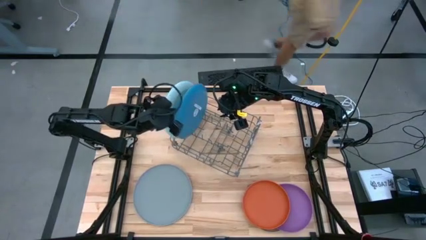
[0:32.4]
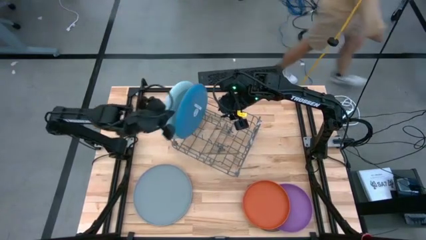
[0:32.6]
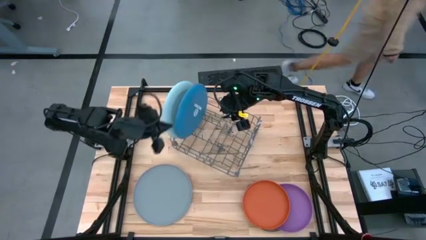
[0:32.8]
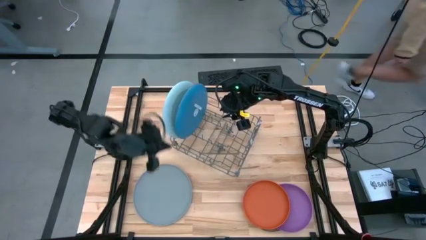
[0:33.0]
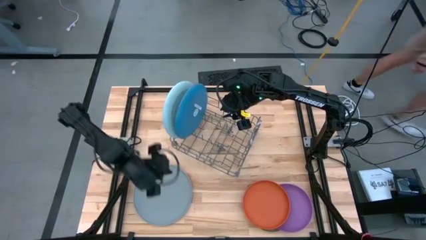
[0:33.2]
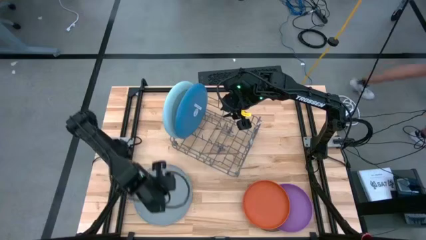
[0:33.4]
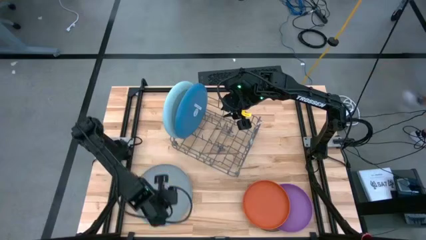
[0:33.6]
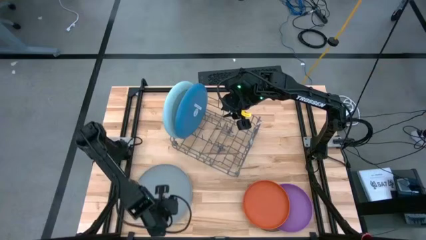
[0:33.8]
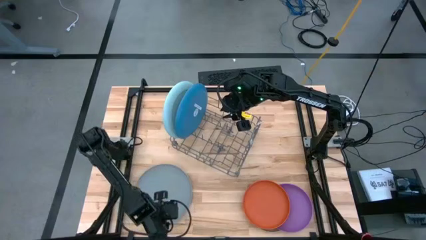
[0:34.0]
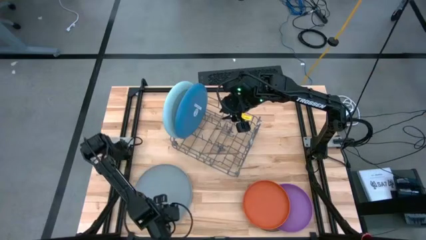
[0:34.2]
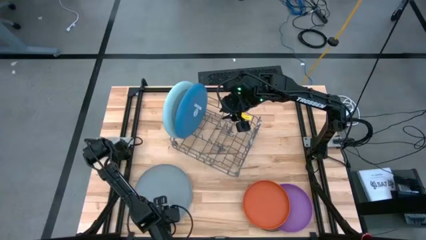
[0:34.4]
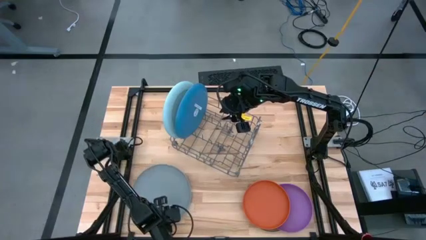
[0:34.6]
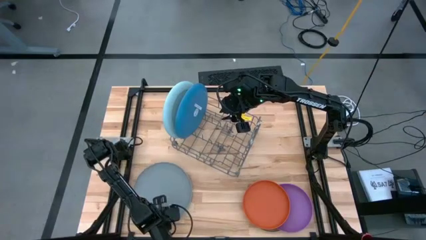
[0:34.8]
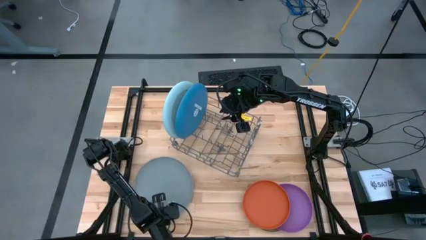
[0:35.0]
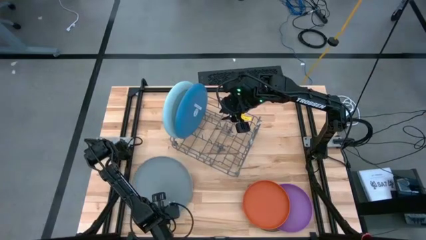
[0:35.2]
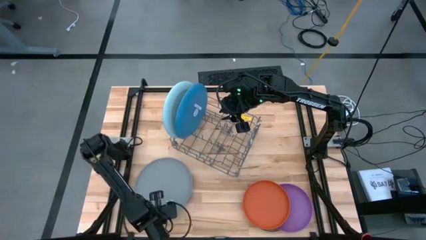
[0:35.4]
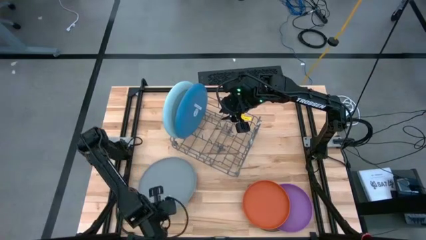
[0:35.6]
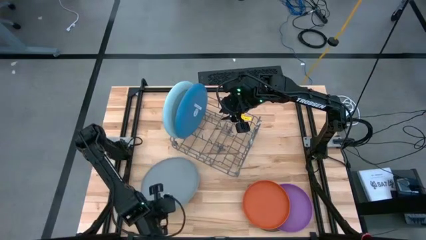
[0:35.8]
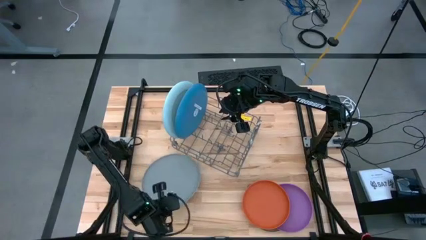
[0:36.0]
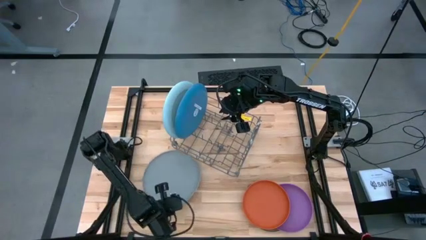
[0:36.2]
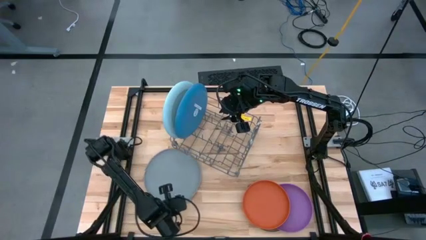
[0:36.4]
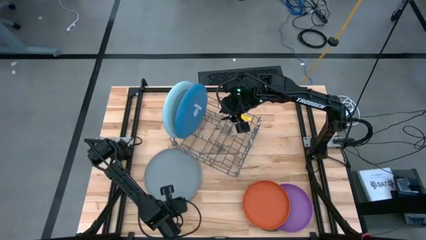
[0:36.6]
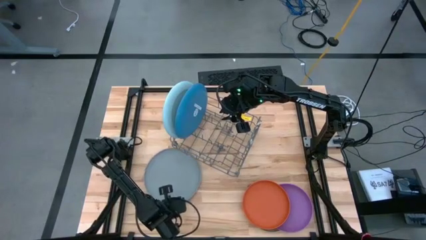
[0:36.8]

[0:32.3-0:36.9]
Task: Sort dishes
Put the gray plate in the dish rack

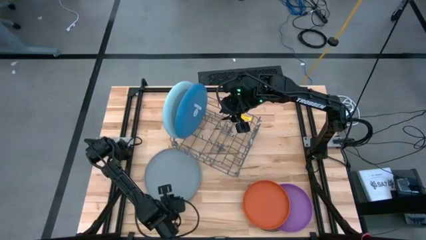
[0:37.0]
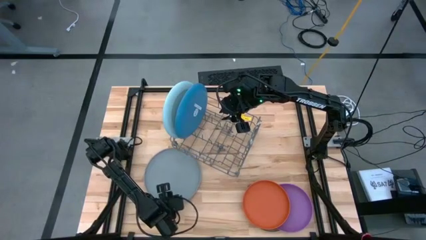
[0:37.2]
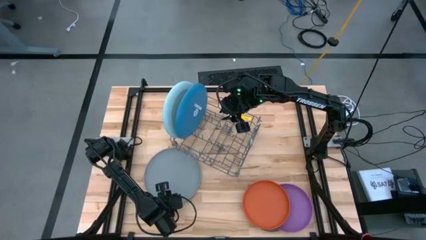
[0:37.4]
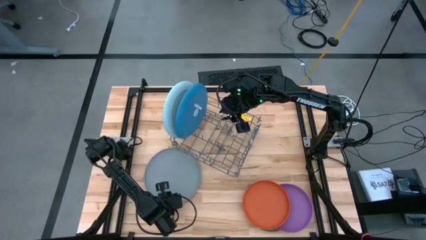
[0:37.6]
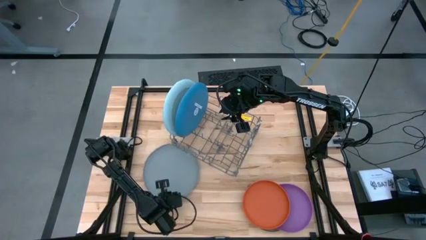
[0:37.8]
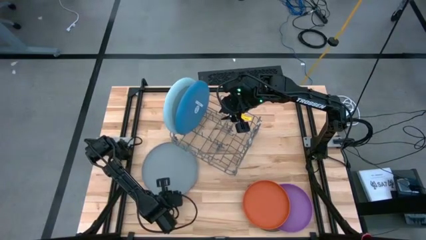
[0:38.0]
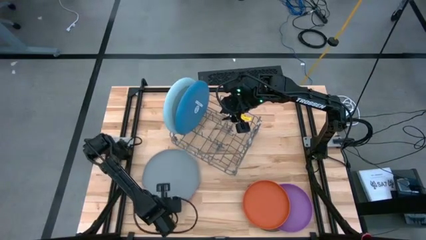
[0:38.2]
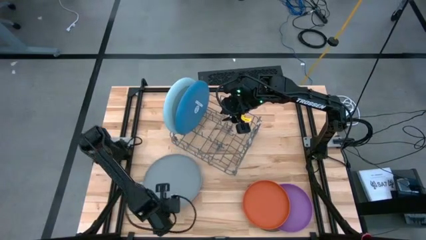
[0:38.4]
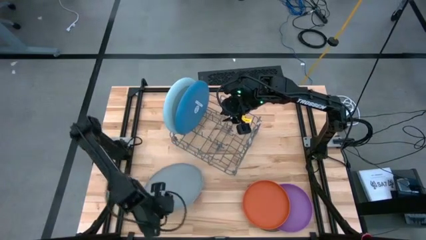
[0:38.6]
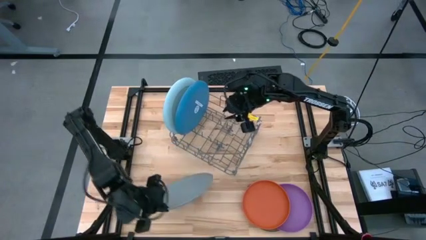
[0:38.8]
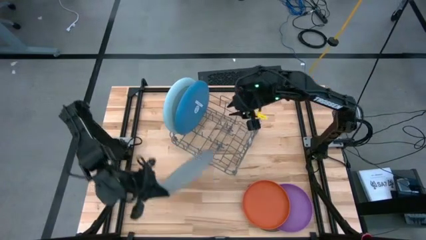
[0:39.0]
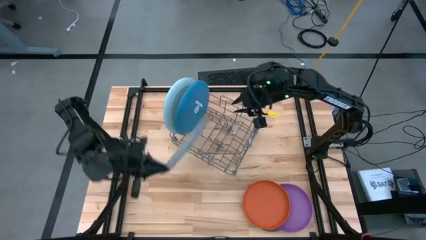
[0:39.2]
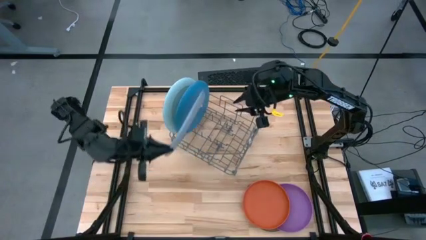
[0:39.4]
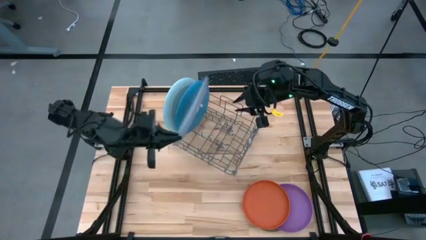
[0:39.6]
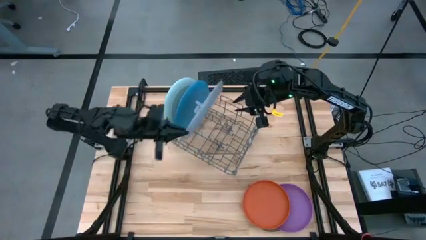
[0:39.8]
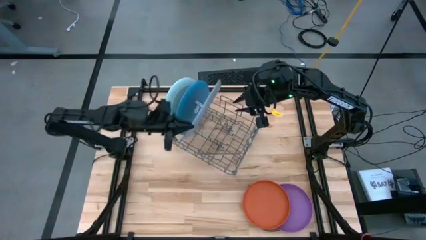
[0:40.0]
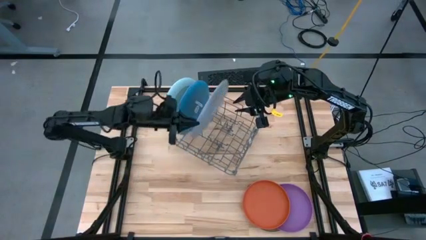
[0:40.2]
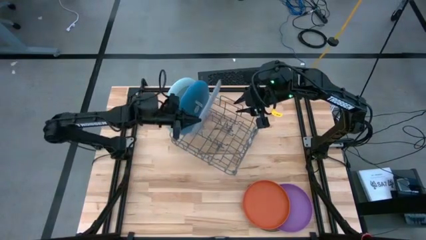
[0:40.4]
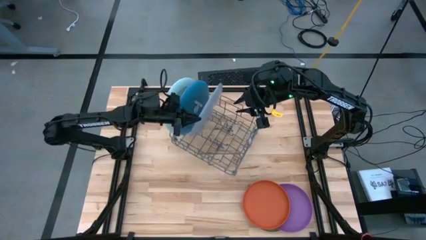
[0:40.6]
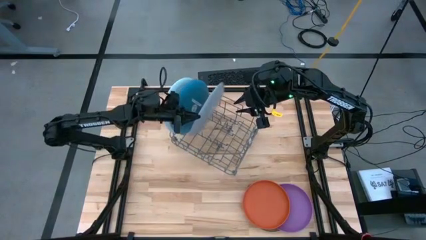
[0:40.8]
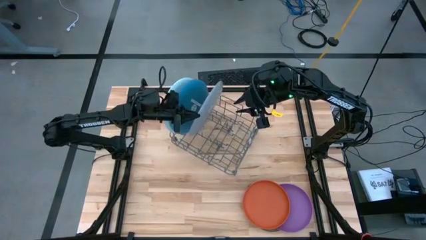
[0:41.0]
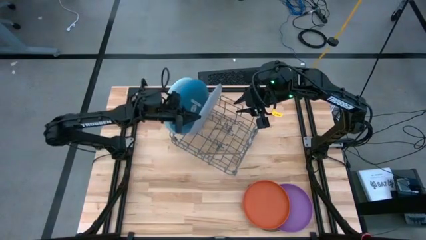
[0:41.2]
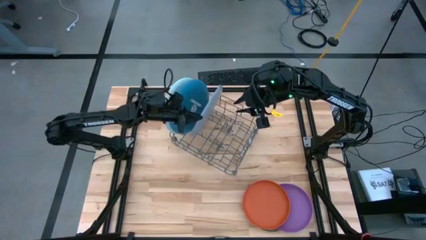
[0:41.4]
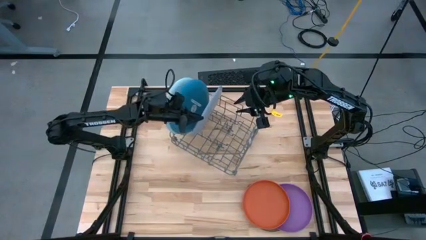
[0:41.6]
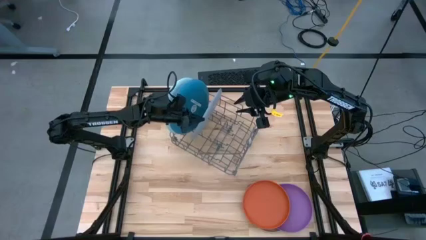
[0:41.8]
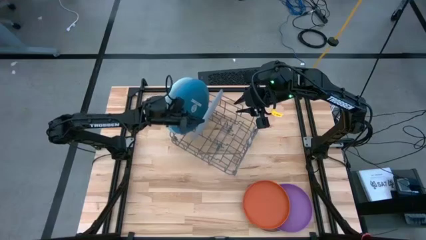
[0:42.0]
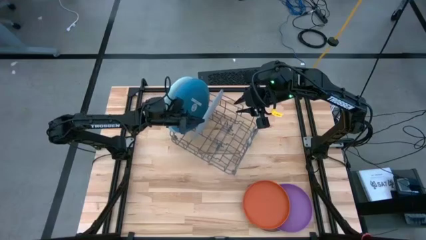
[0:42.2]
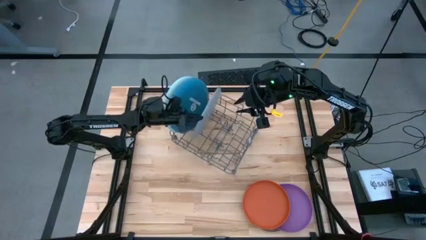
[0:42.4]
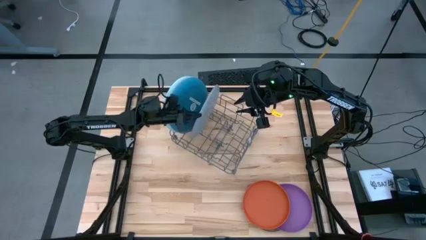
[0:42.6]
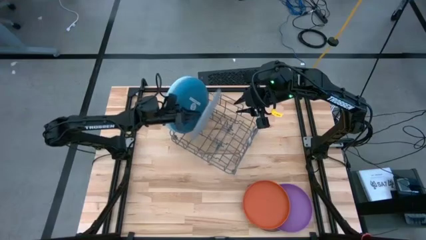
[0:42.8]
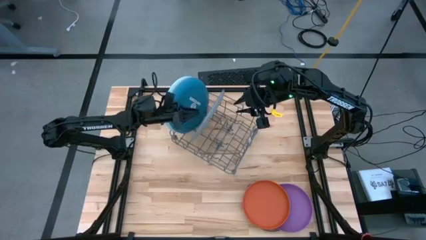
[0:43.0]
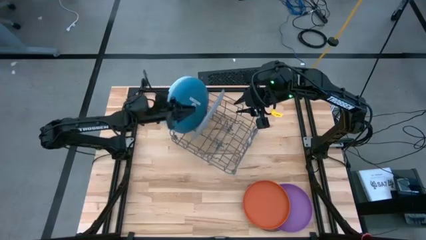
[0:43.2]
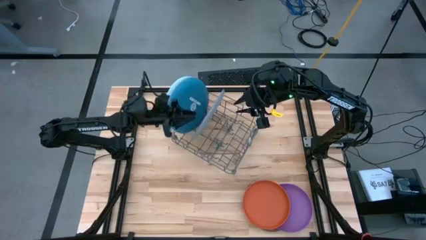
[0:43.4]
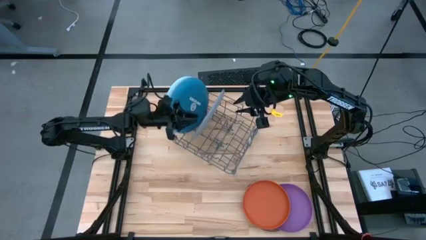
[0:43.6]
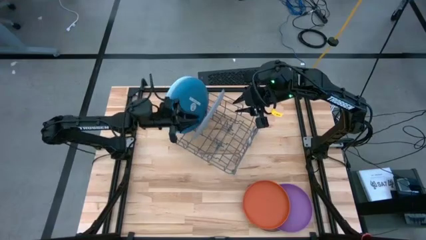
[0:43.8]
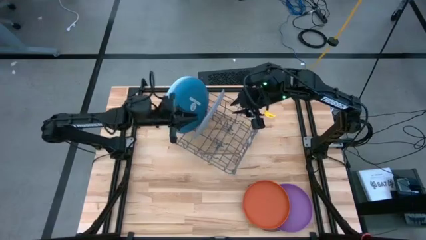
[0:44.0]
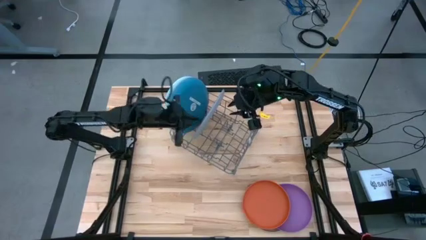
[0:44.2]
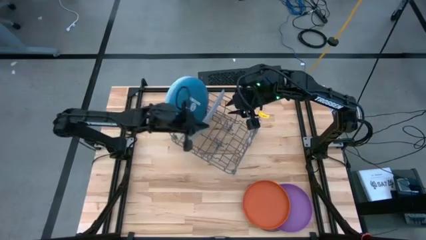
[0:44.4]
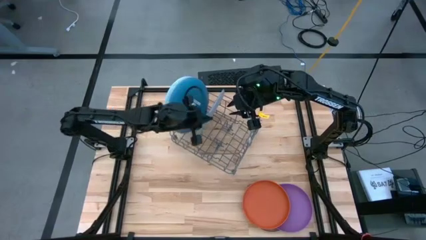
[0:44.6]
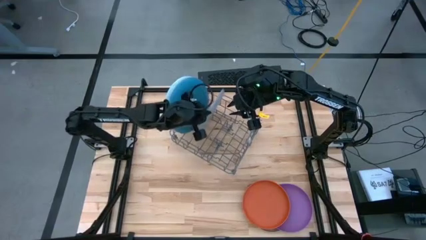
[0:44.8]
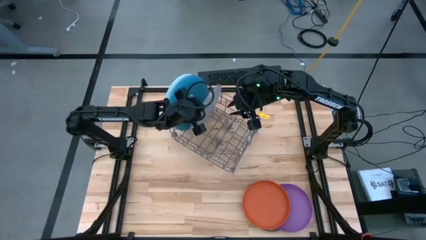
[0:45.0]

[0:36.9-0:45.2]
Put the gray plate in the dish rack

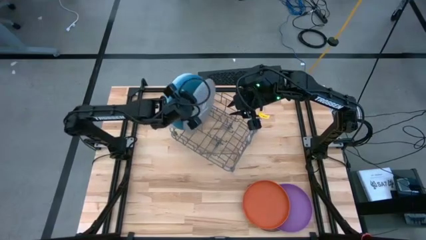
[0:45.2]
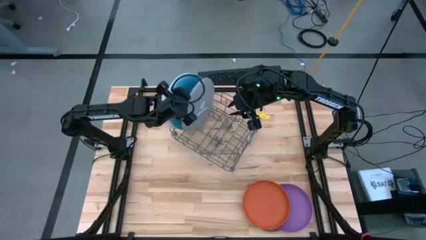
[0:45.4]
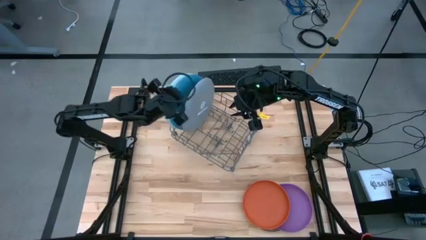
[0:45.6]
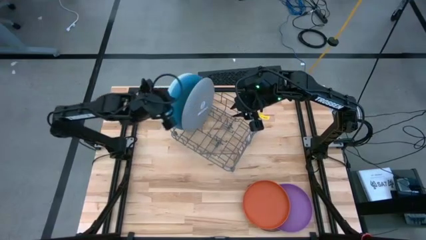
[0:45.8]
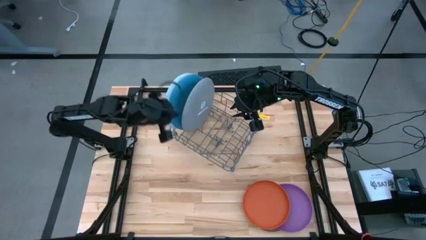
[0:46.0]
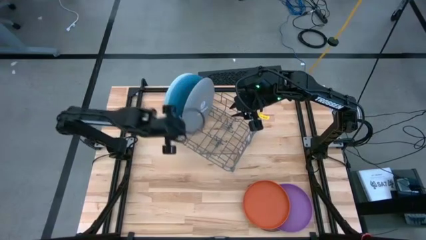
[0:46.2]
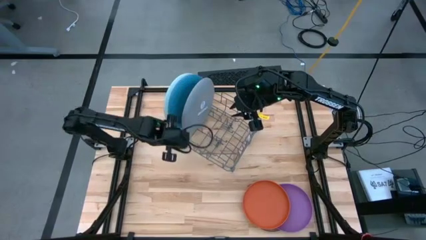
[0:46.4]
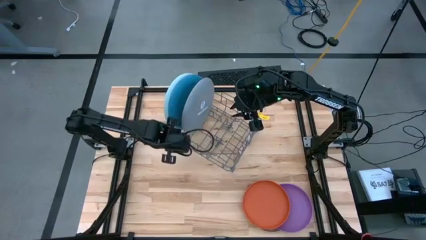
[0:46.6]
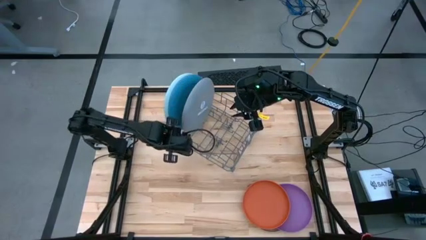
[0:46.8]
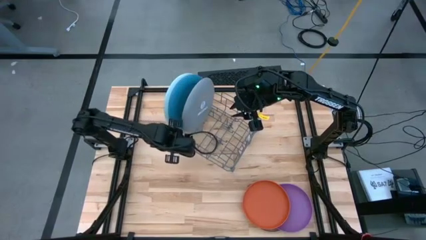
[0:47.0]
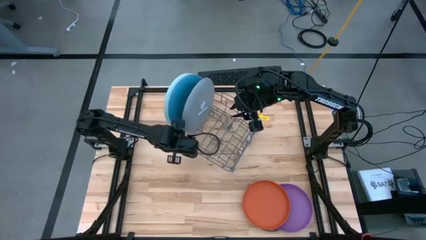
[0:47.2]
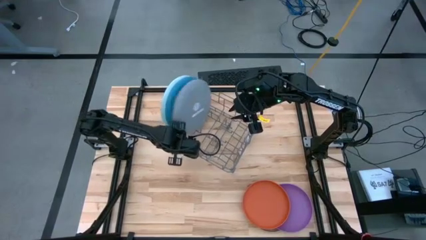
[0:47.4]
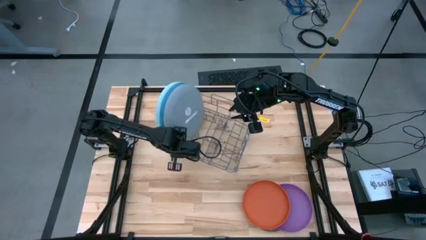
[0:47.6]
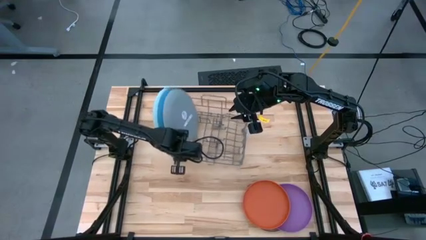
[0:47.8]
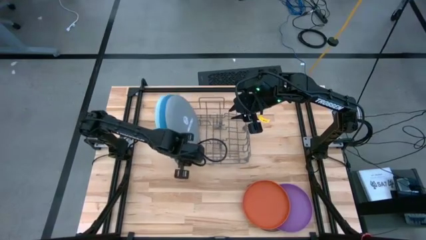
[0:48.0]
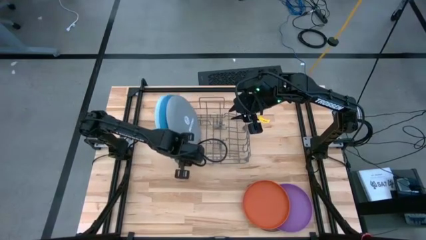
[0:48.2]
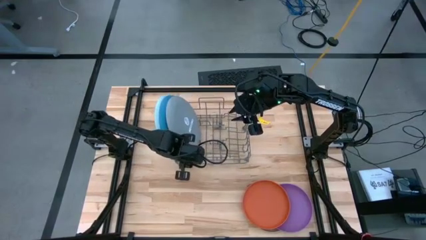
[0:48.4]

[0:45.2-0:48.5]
Adjust the dish rack
